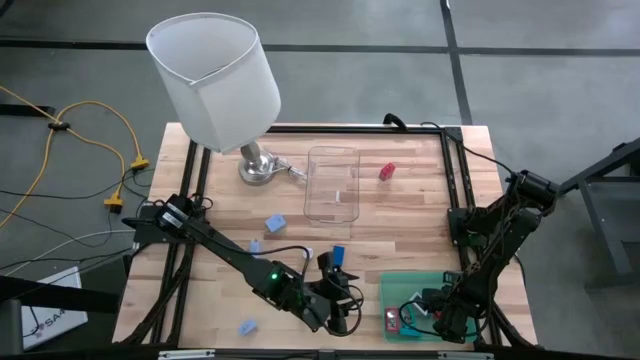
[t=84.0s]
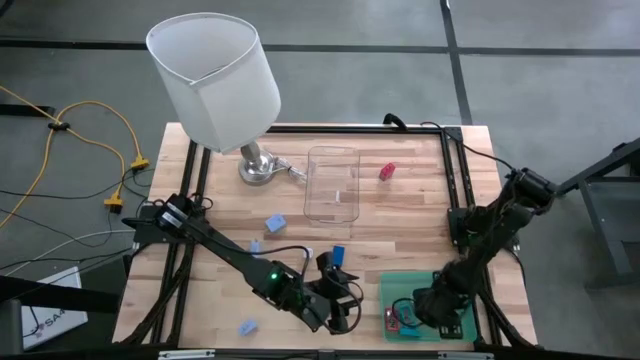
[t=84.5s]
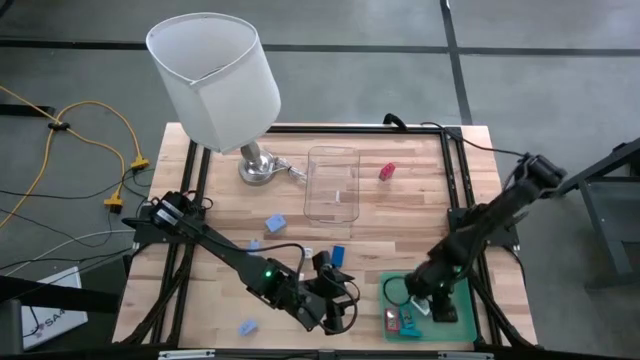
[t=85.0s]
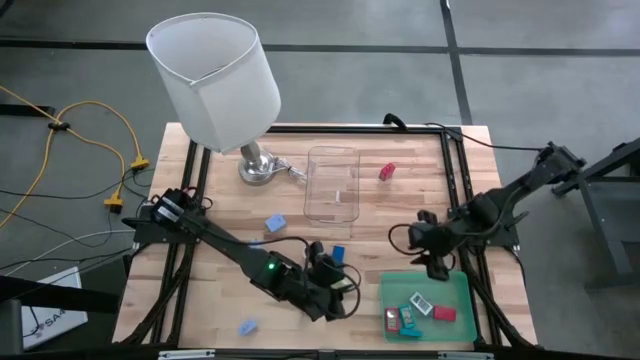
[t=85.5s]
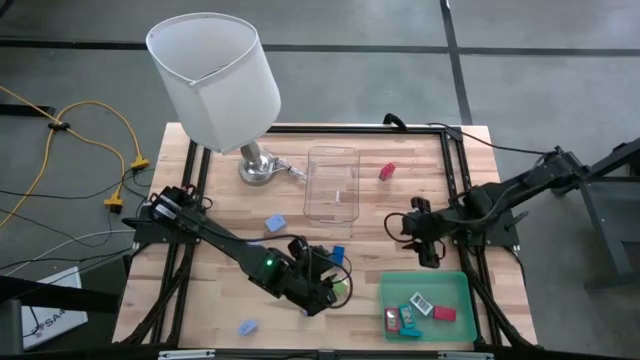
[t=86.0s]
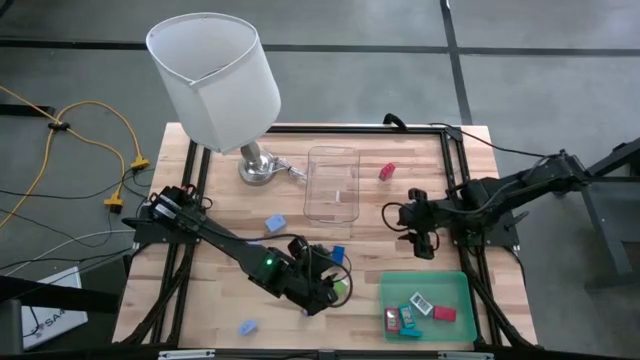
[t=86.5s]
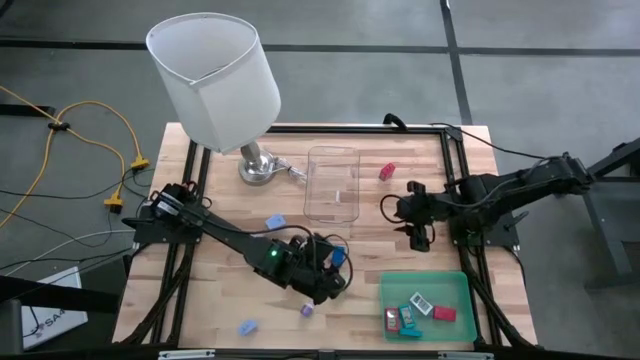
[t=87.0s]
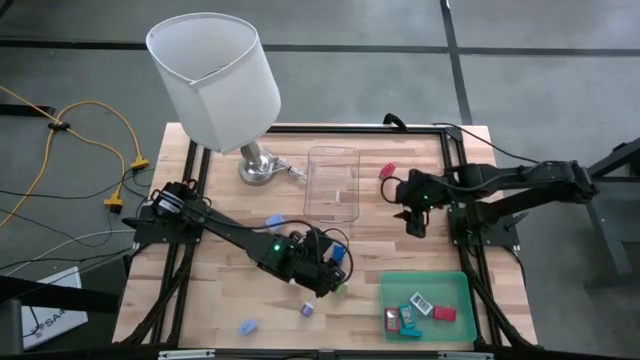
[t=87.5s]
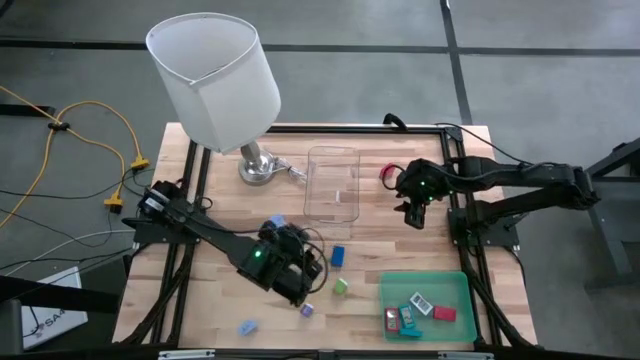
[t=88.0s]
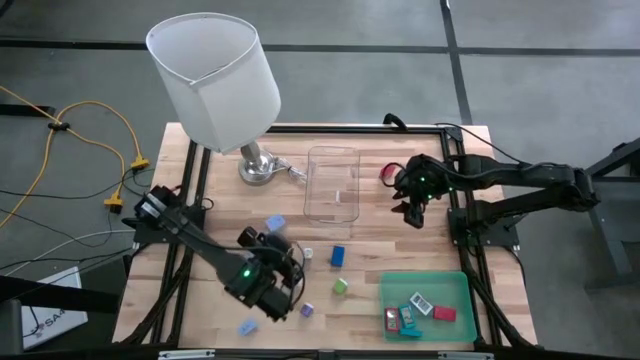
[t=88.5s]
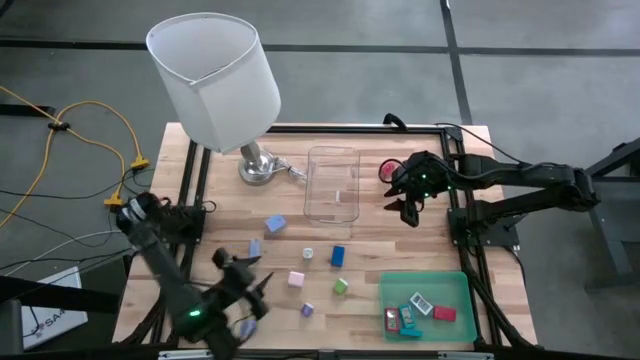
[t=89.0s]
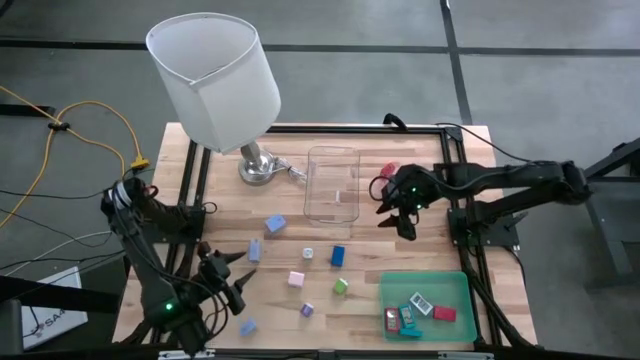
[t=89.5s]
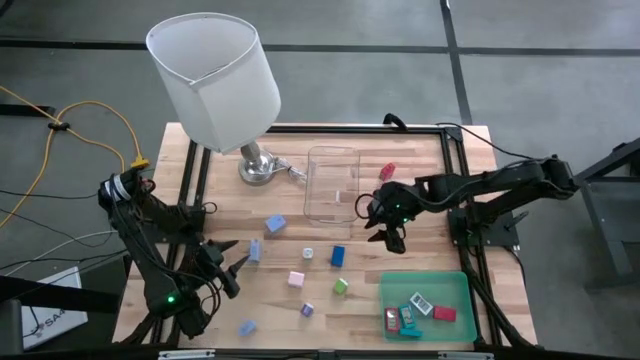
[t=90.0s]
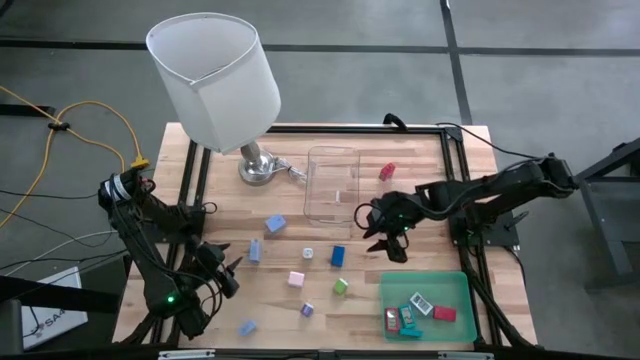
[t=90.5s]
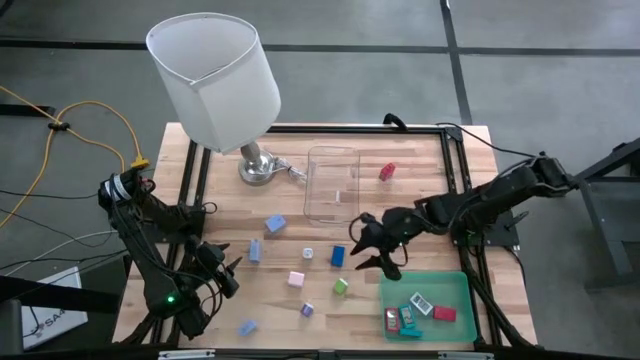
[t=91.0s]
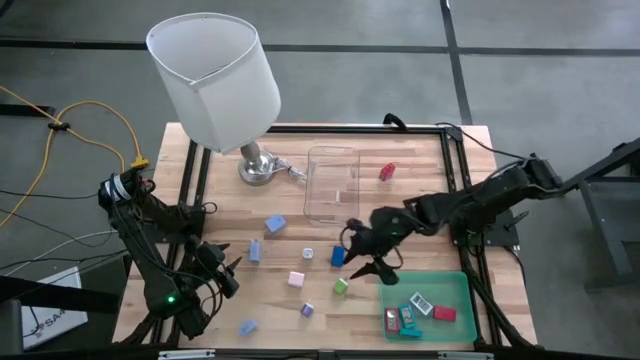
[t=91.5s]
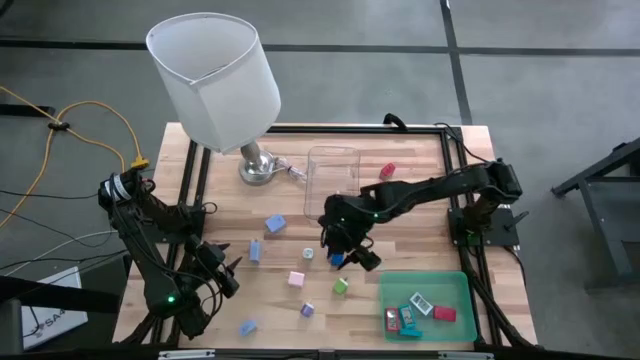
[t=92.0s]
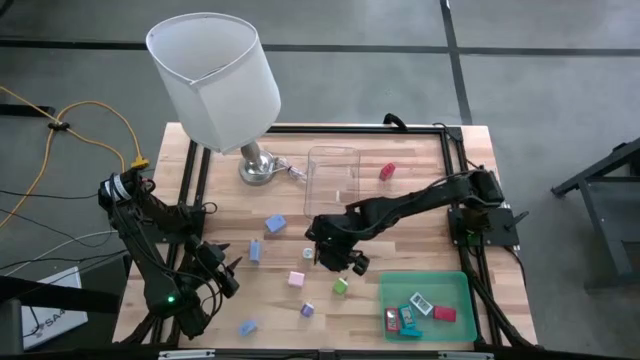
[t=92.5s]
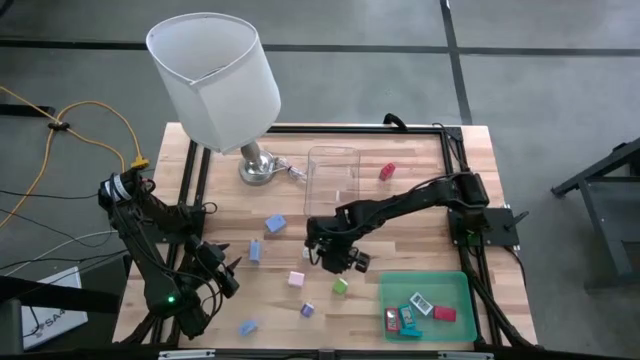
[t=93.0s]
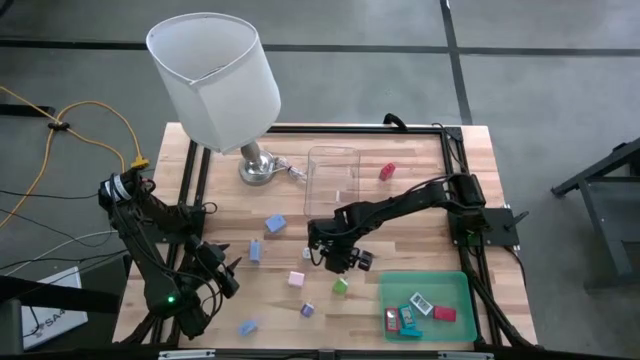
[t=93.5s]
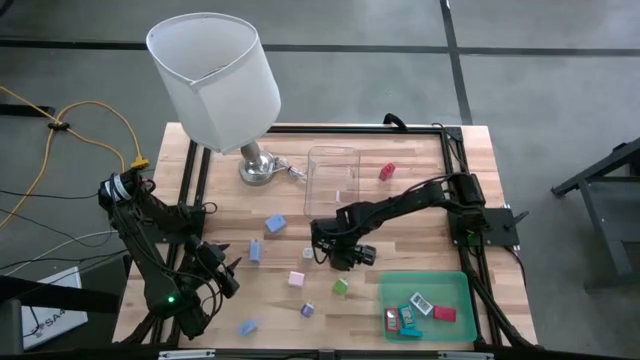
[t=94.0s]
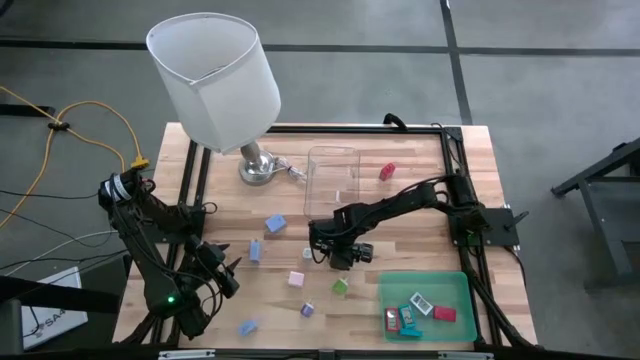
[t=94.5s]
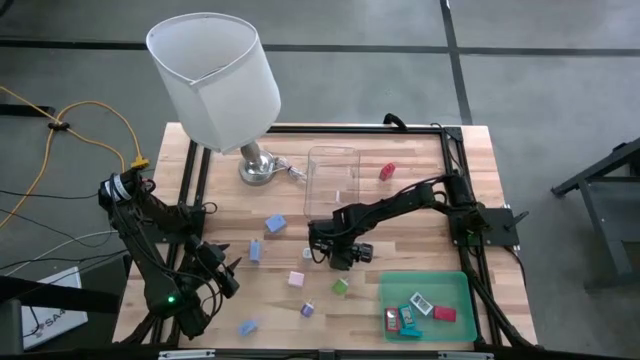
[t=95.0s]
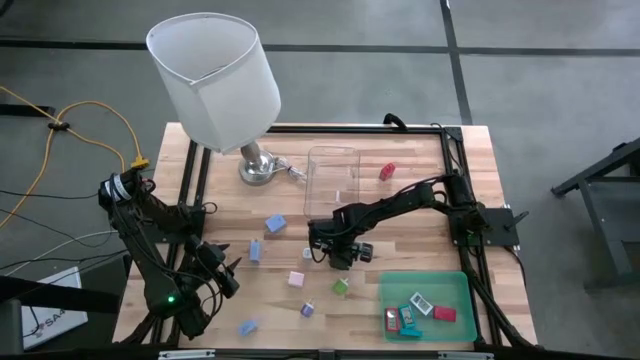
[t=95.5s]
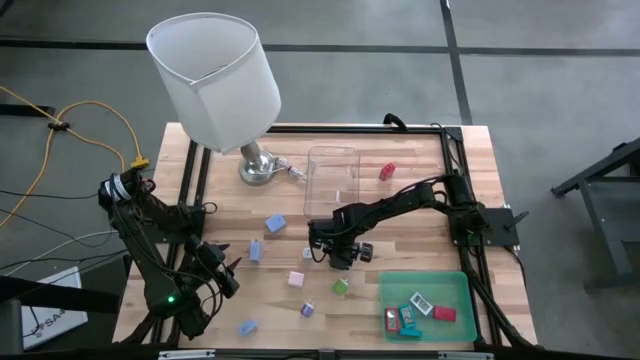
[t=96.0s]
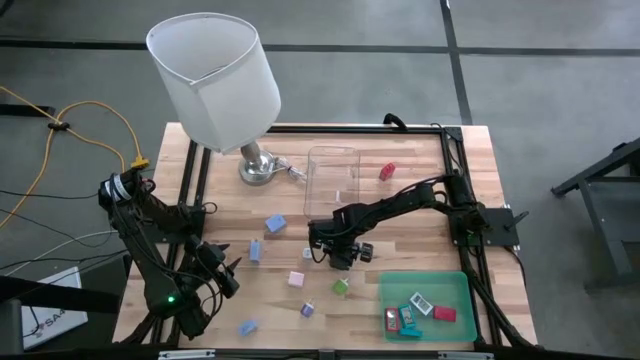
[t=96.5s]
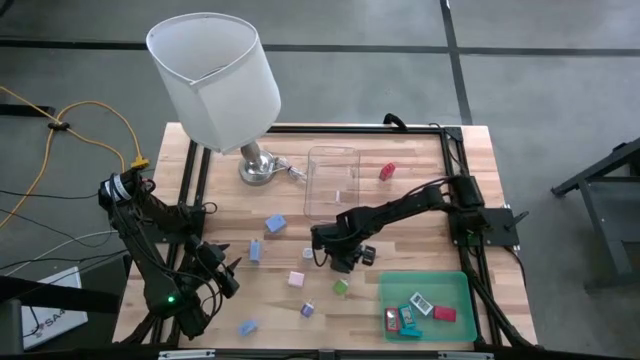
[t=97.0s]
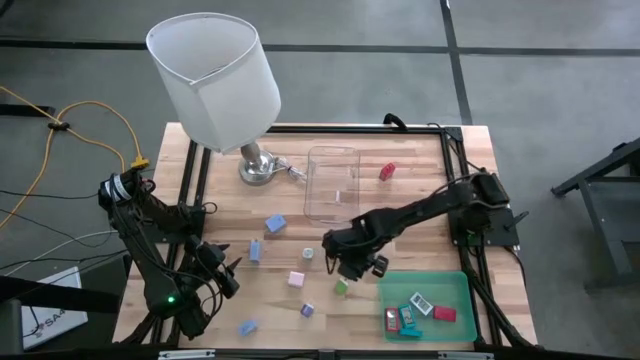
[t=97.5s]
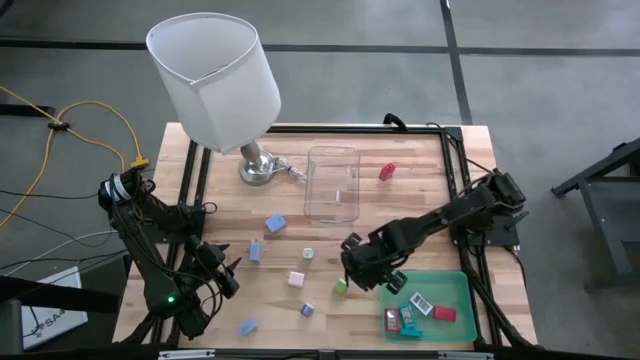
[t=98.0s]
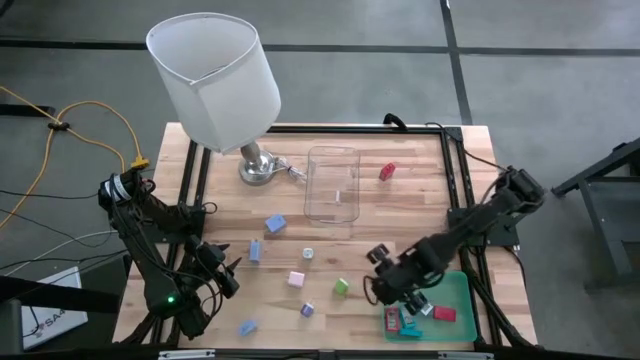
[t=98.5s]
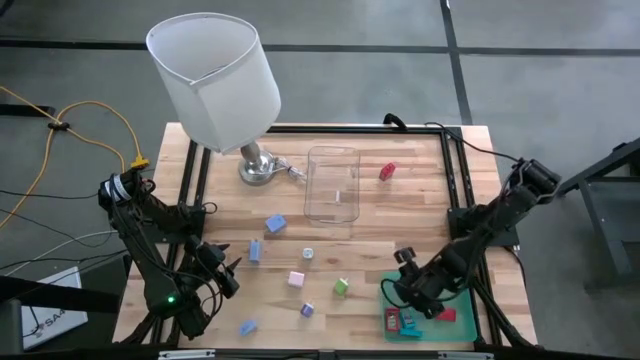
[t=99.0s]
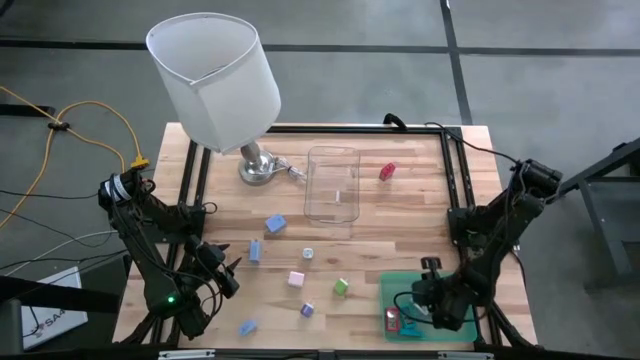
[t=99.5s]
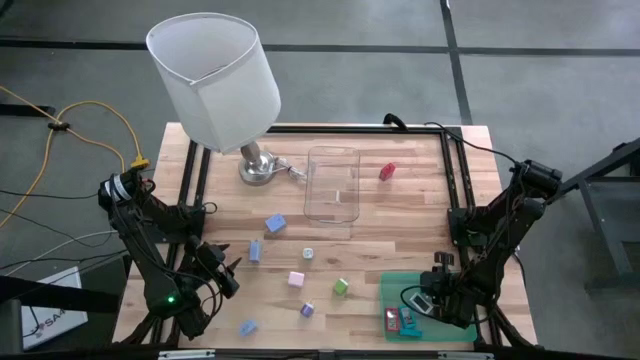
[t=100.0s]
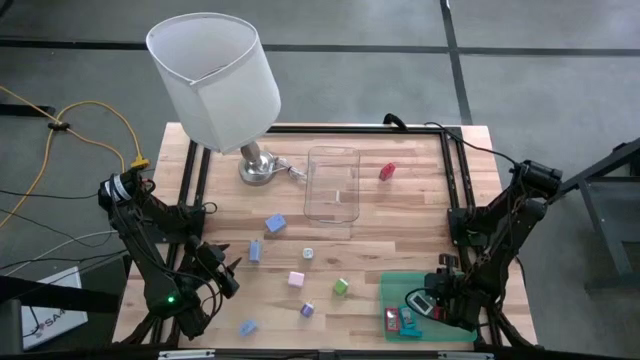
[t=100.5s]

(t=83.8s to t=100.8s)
Task: Pick & Place Office items
Put the blue digital clock into the green bin

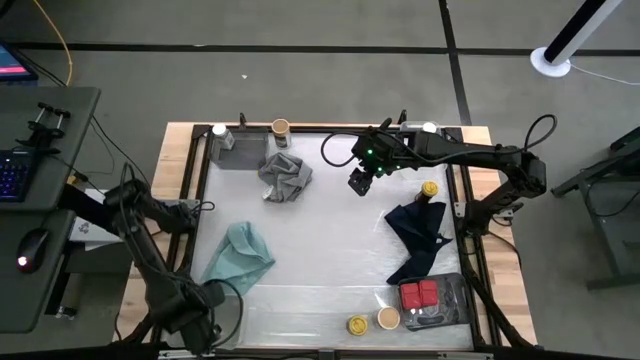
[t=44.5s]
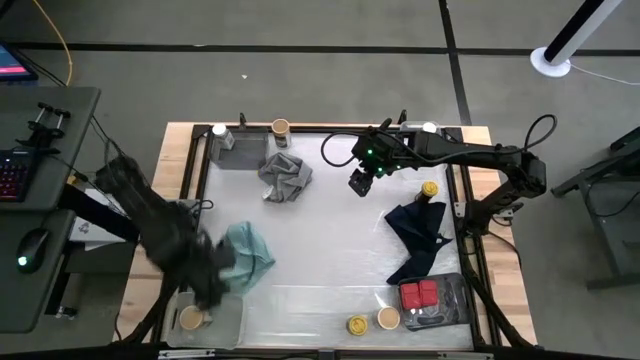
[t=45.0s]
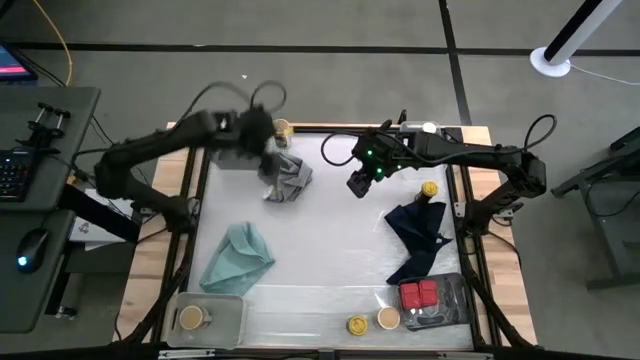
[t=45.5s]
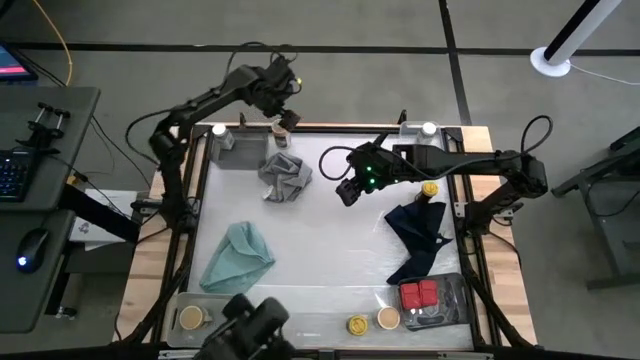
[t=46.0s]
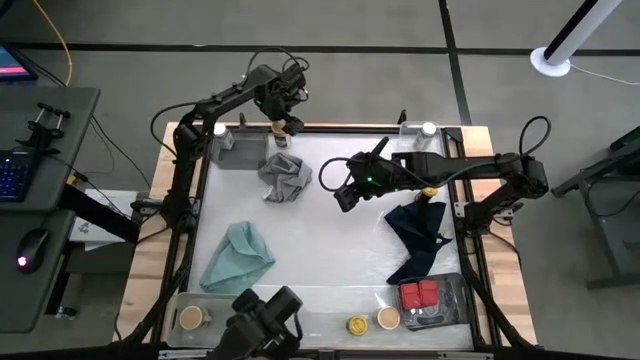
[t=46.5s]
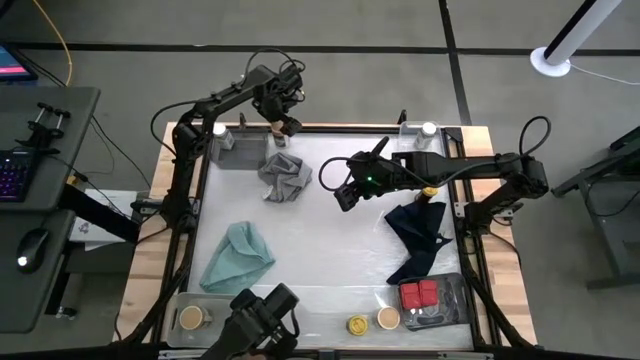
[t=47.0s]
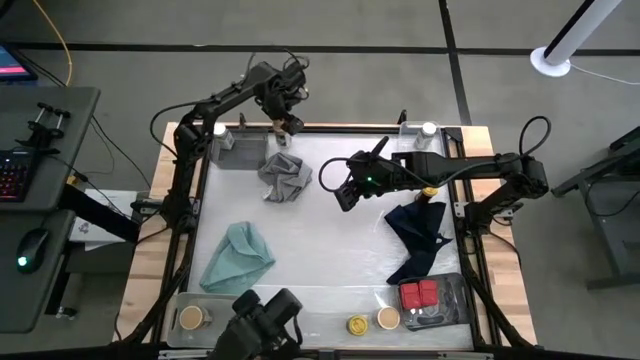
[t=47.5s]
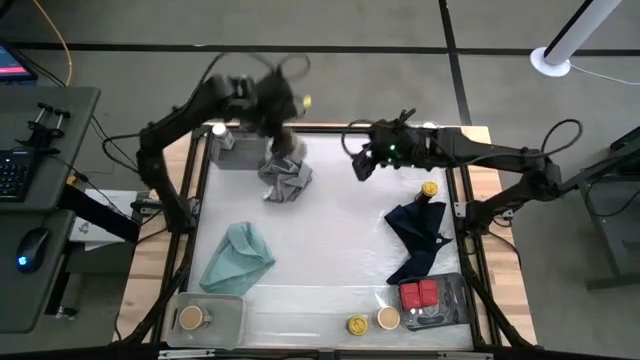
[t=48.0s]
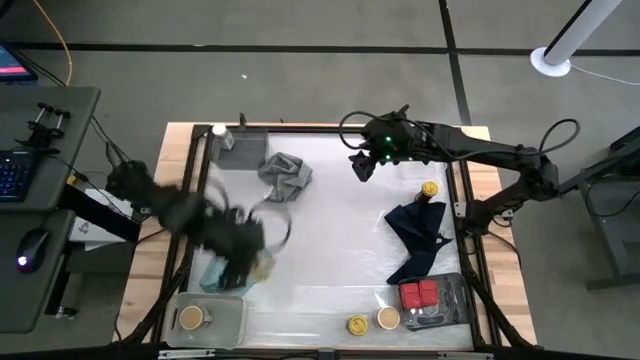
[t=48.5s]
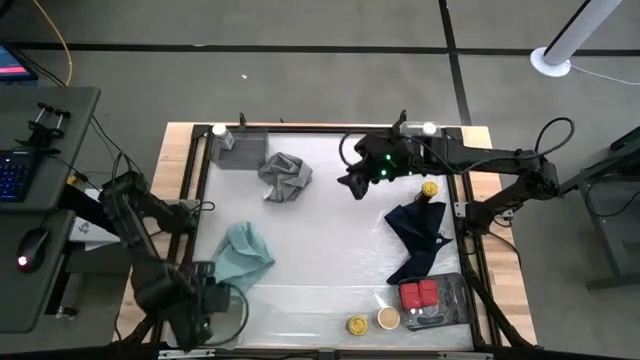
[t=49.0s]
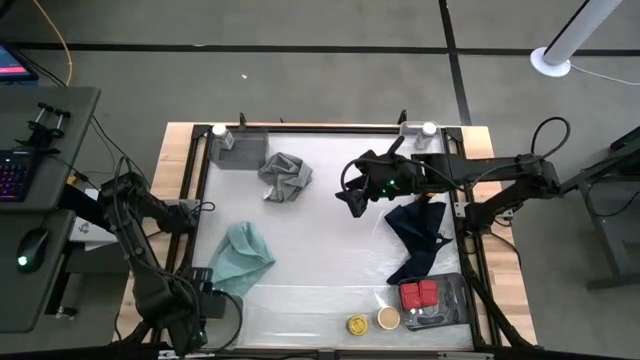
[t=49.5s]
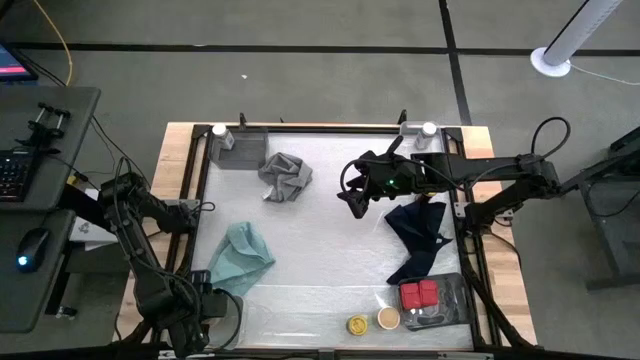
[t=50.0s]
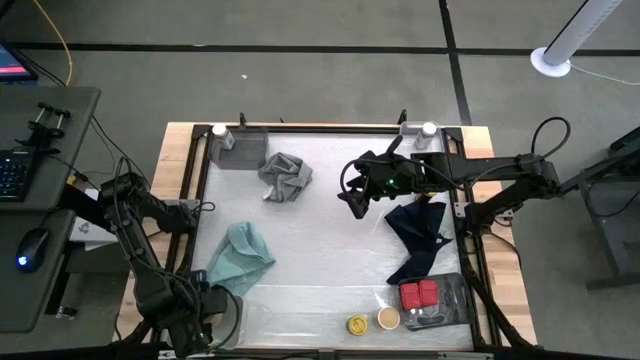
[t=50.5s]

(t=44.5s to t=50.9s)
Task: Sort spices by type
Put the top brown seasoning bottle into the white bin
